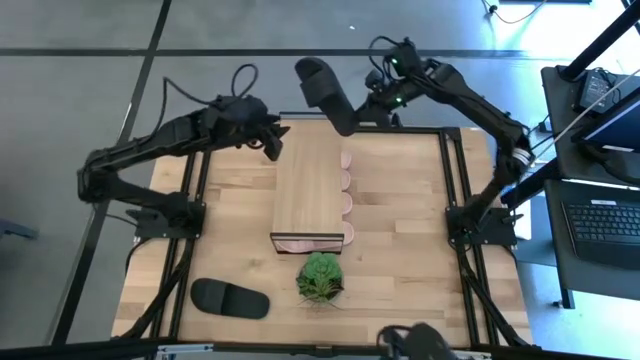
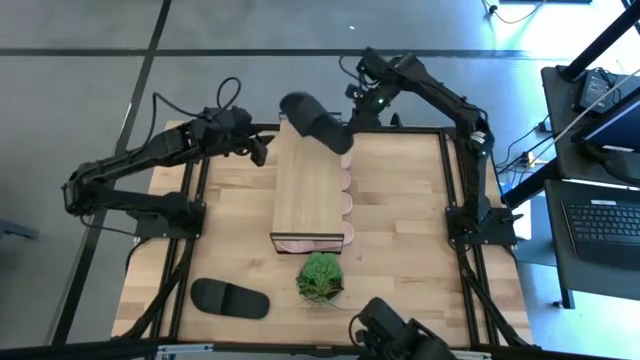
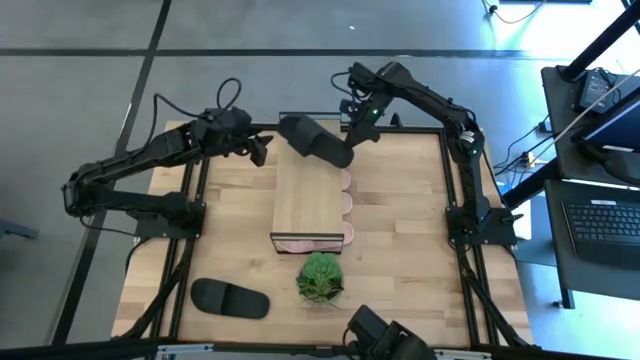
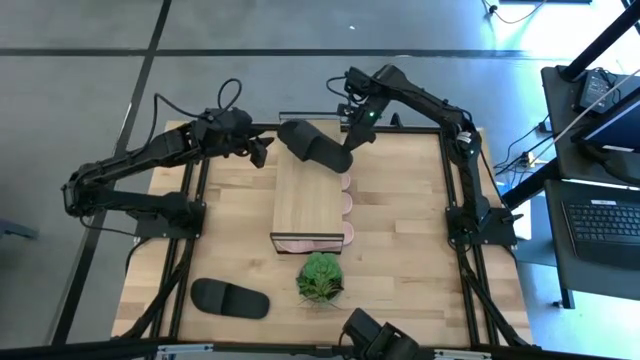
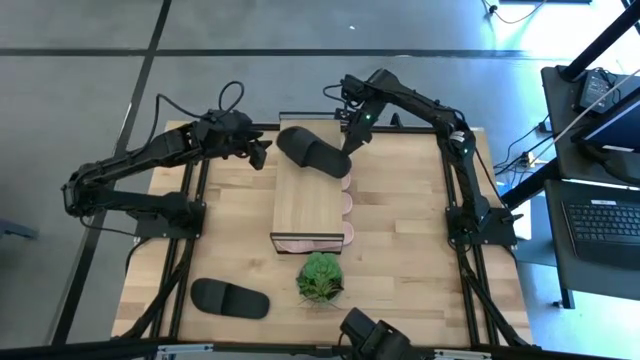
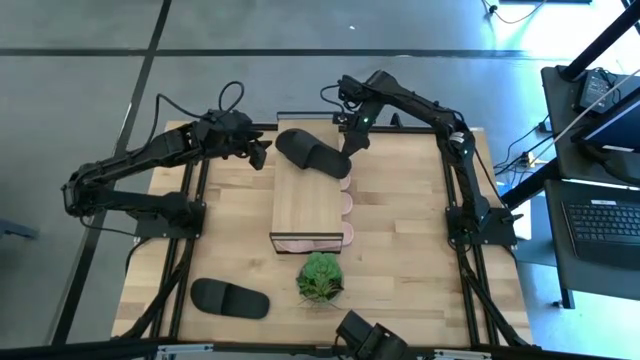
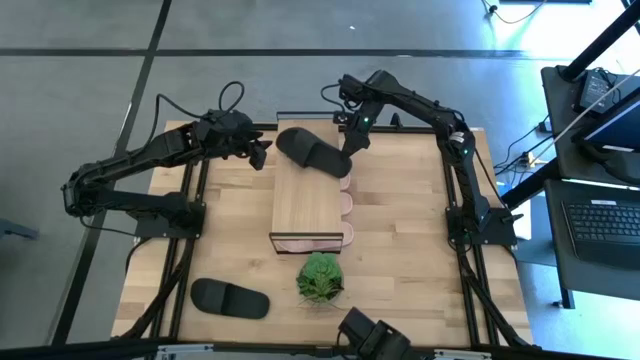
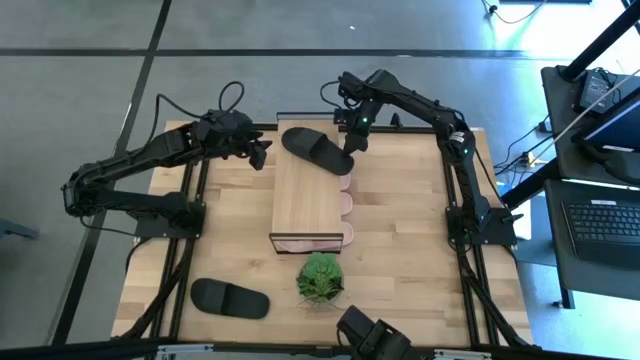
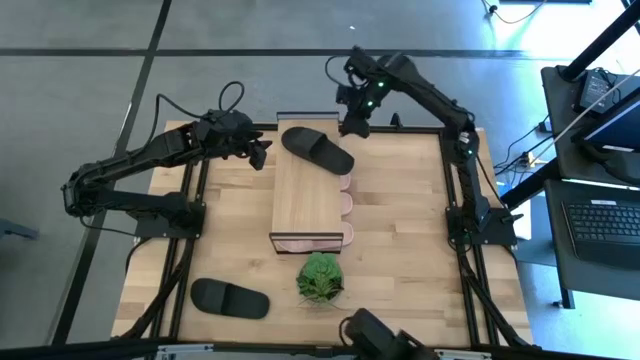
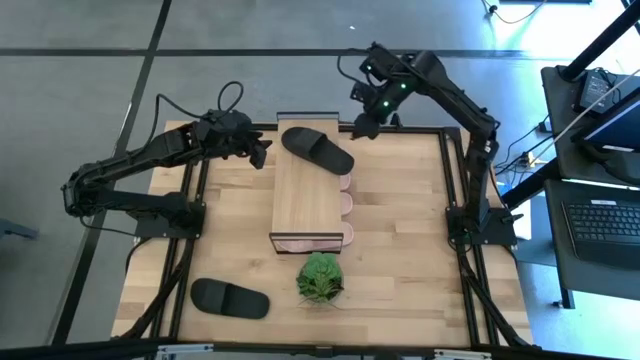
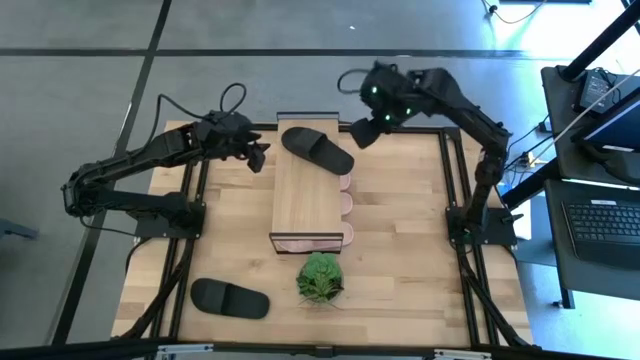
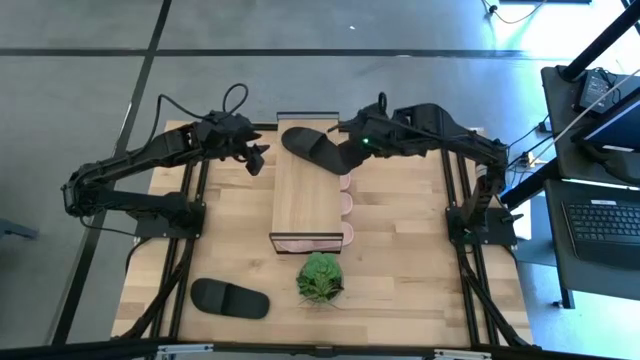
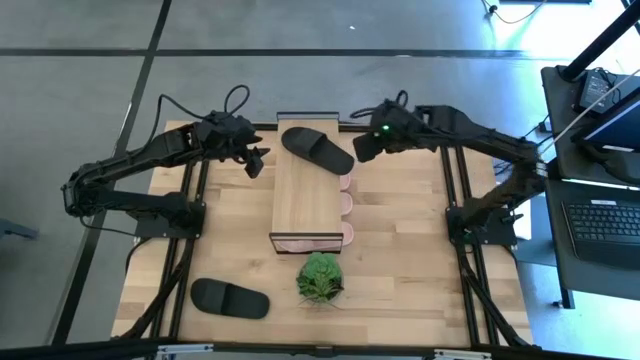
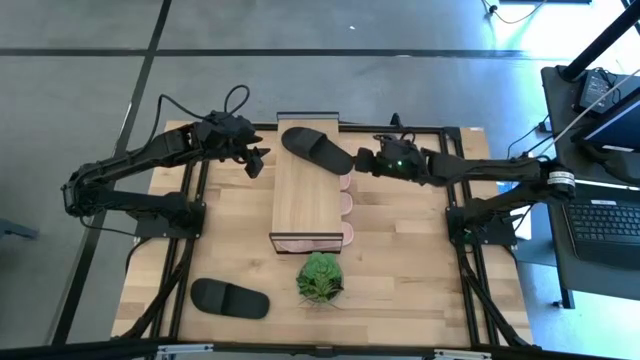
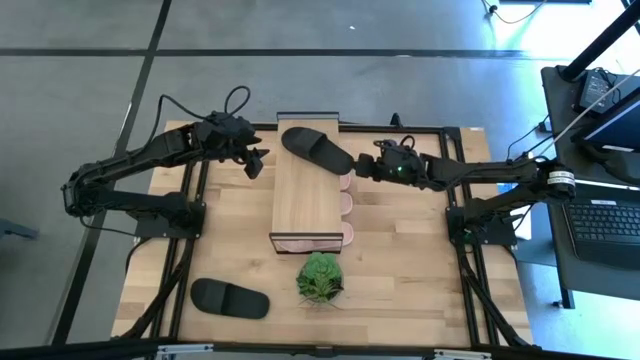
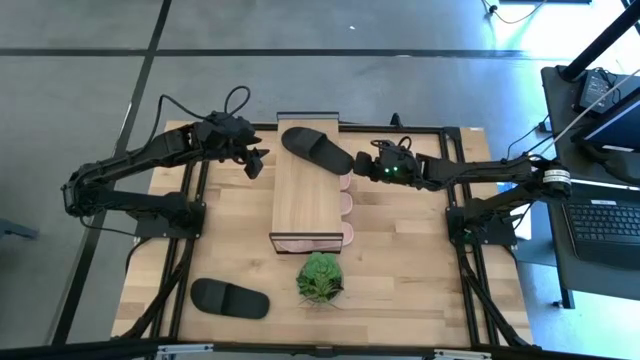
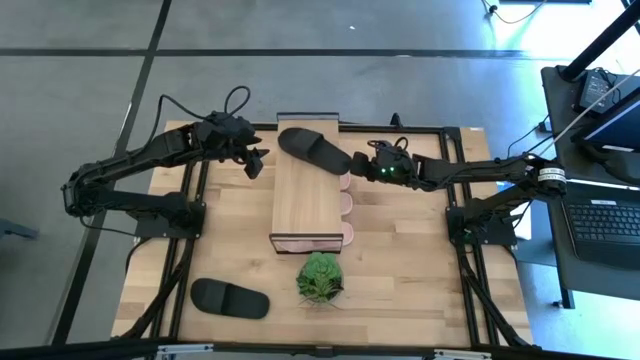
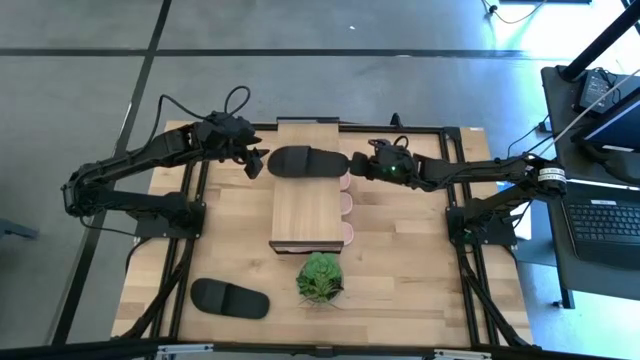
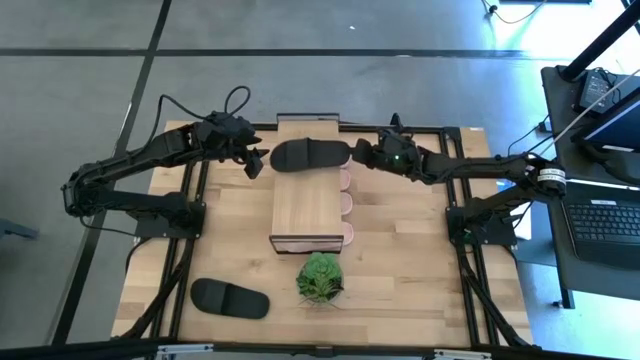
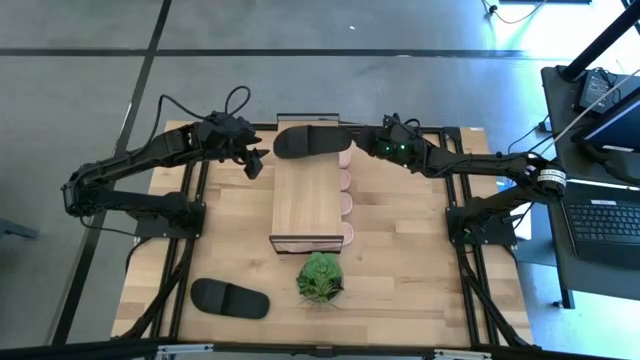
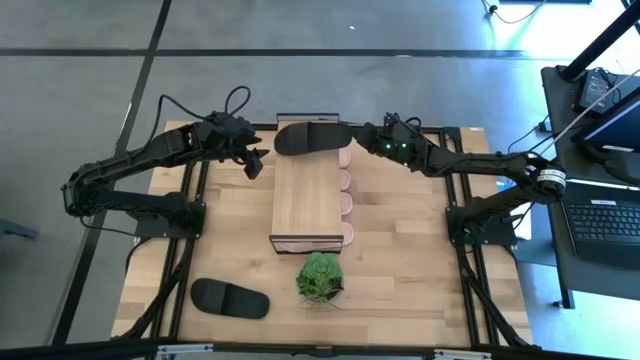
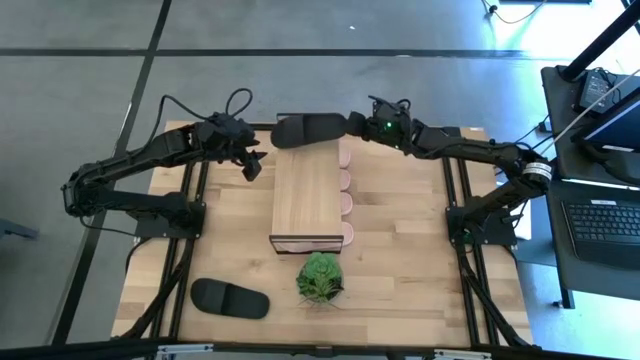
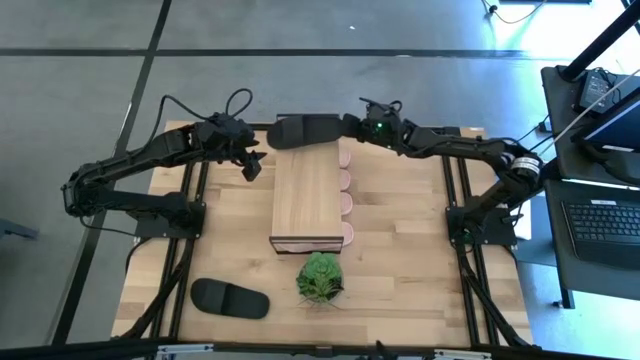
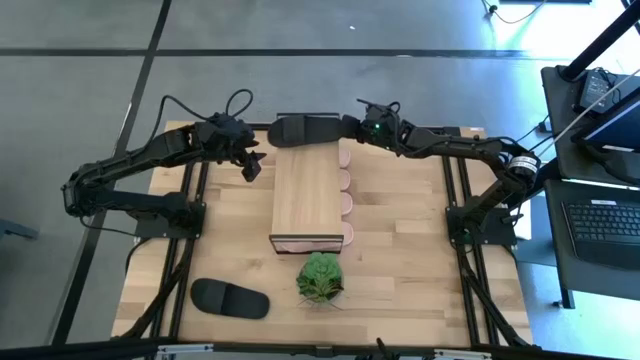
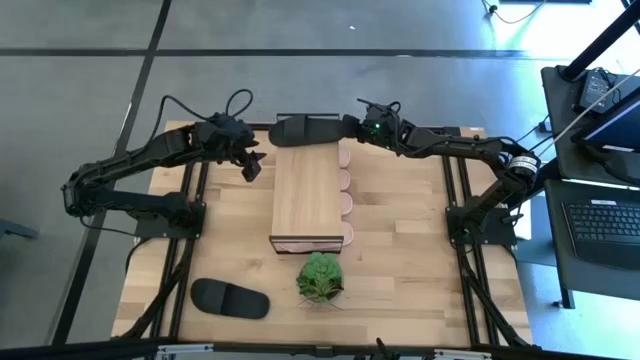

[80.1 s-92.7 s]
Task: Pick and place slides into the shelf
Put the black slipper on the shelf

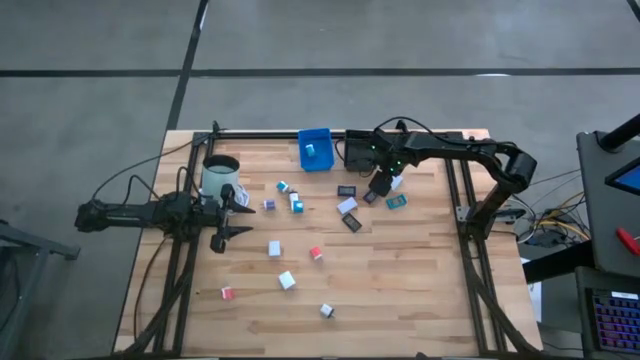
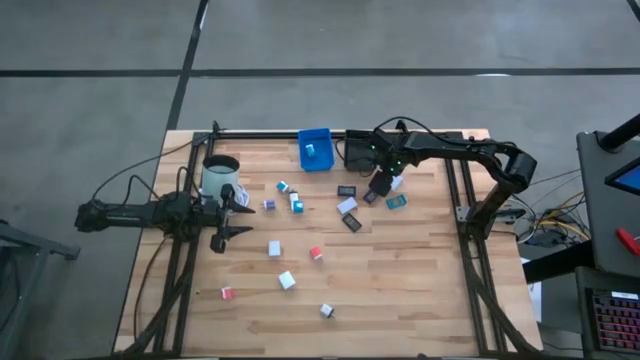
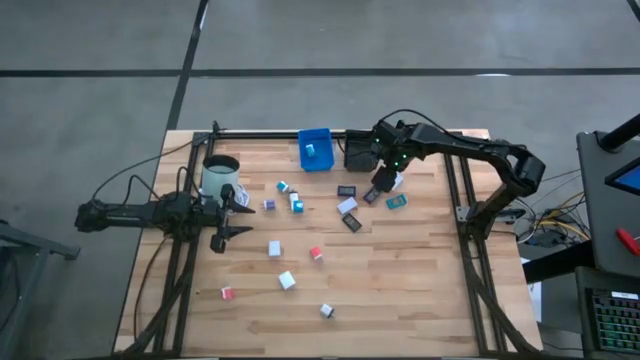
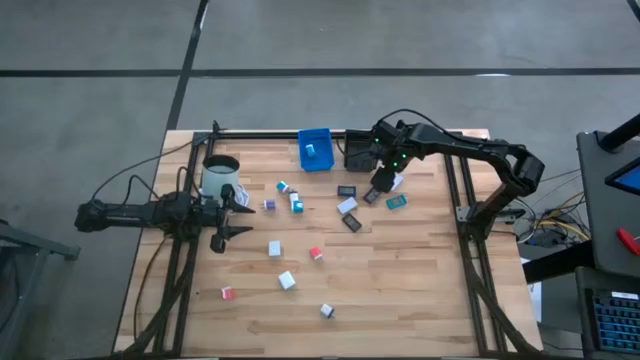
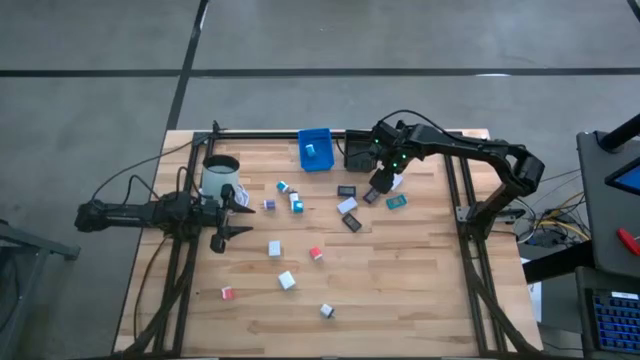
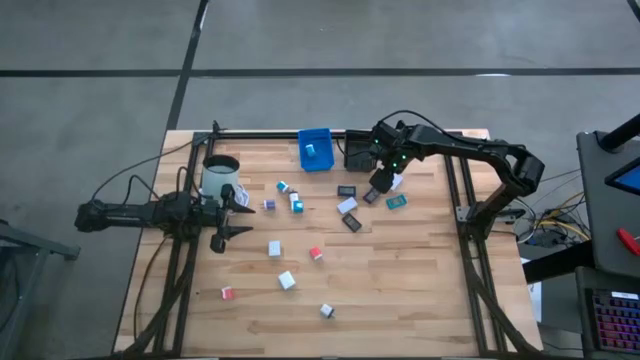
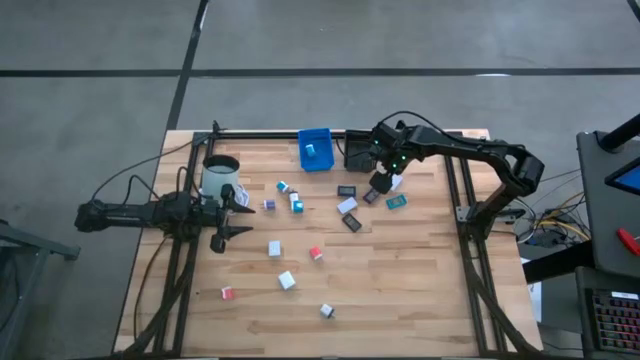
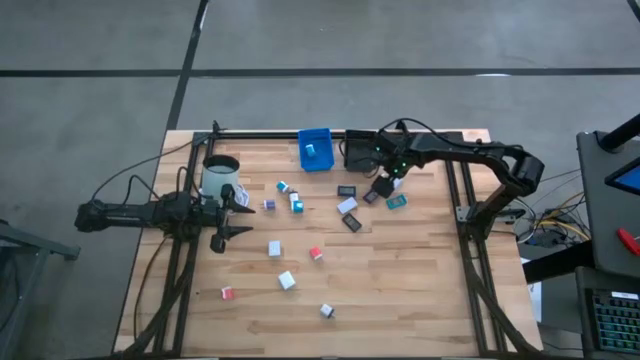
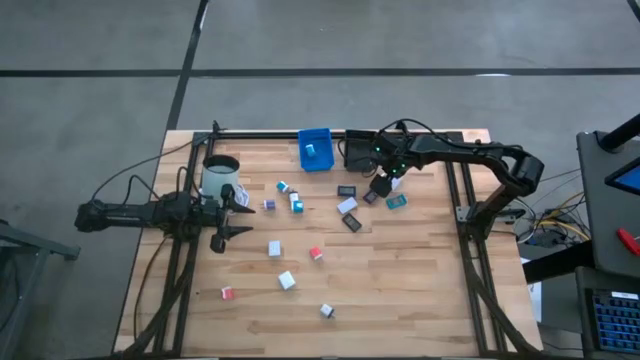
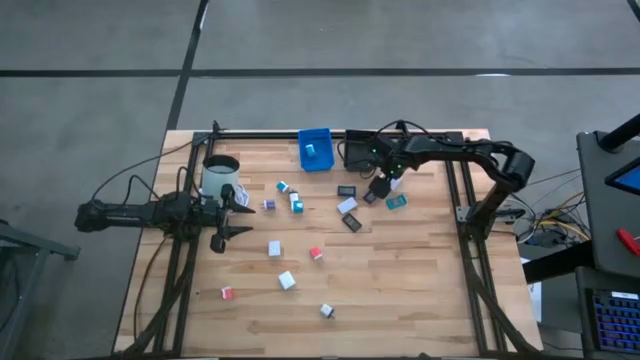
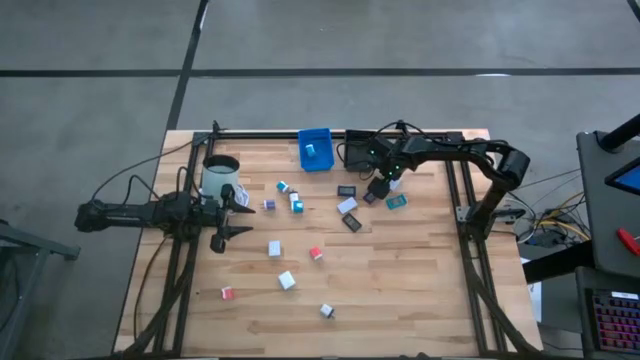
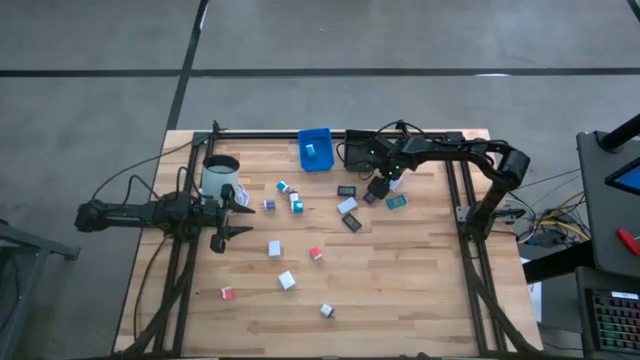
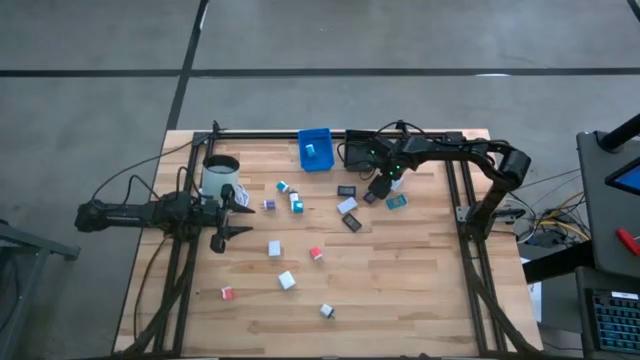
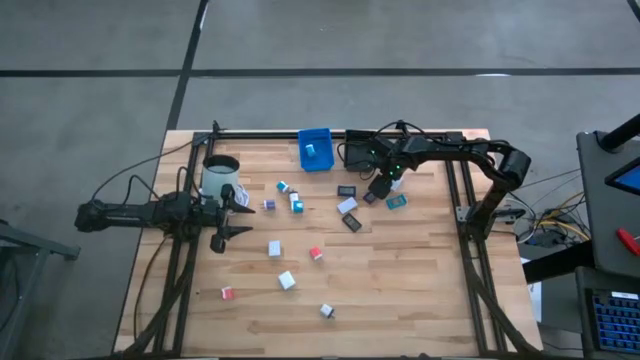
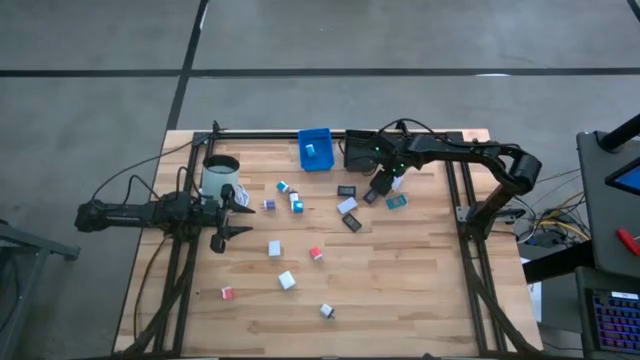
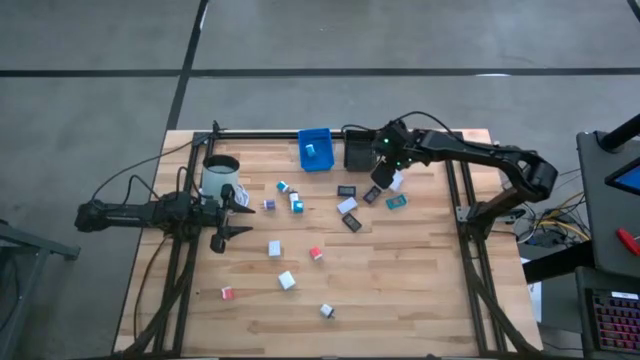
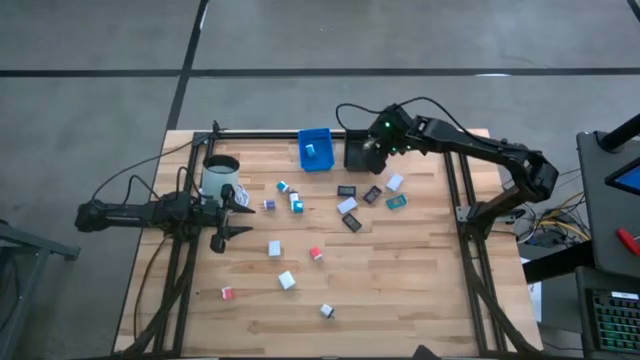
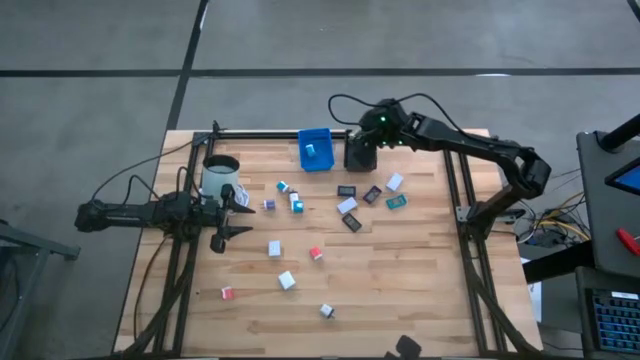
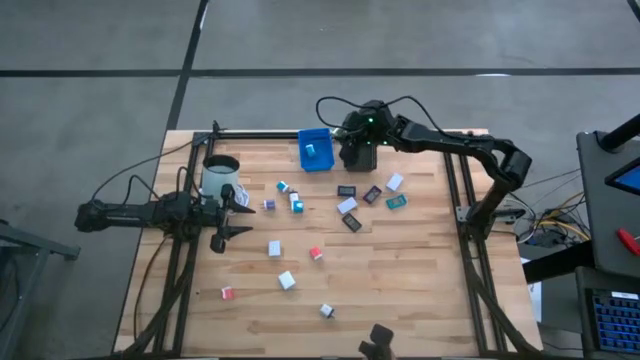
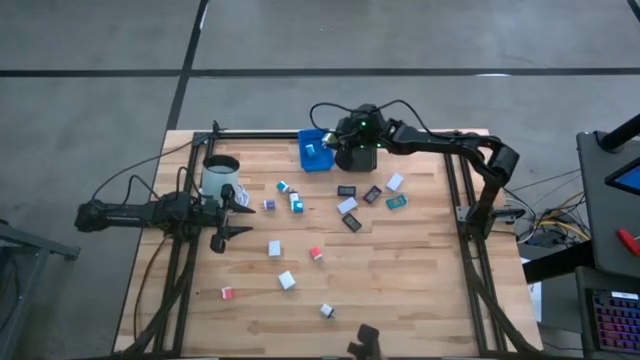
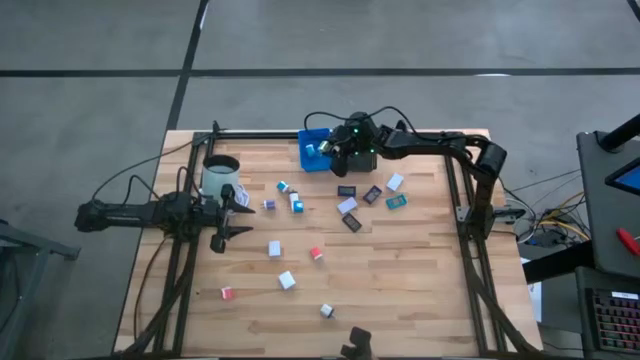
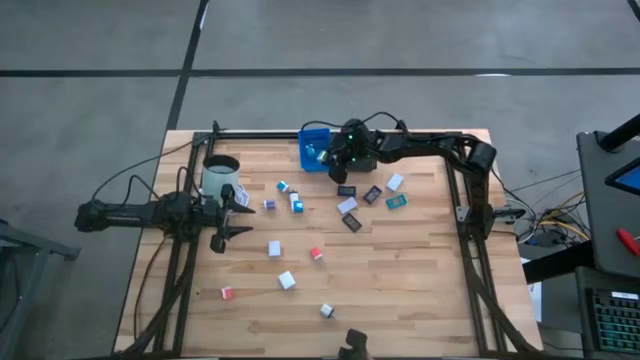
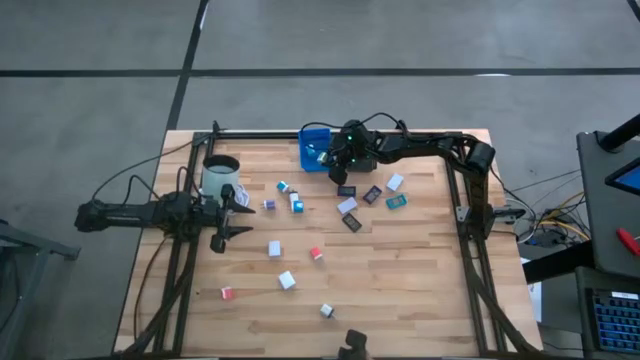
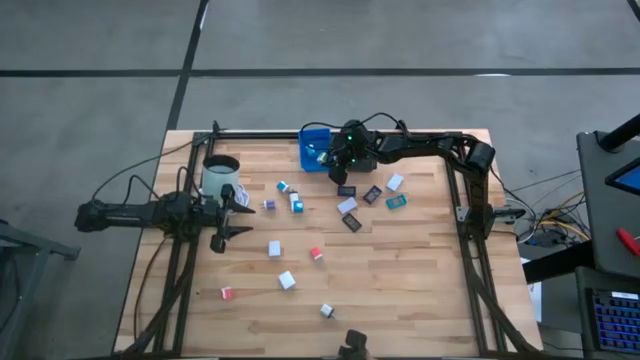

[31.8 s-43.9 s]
Task: Pick & Place Office items
Put the small green adapter into the blue basket
